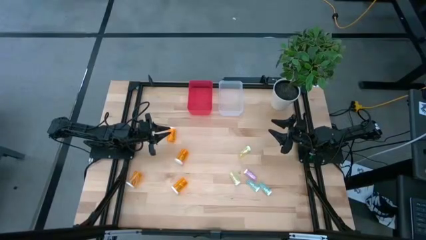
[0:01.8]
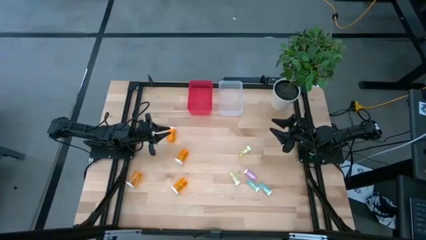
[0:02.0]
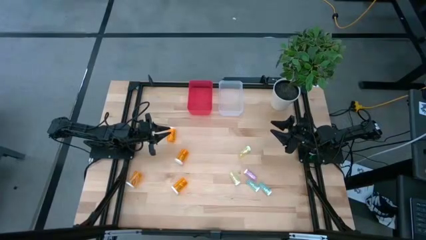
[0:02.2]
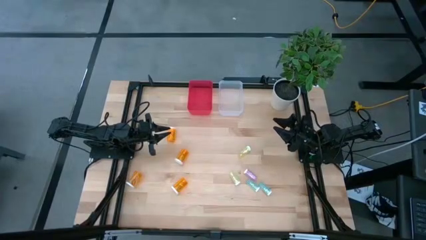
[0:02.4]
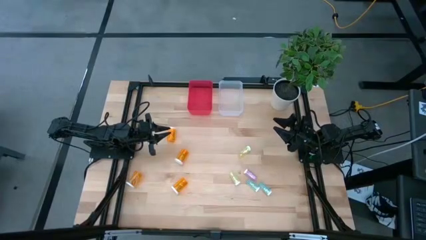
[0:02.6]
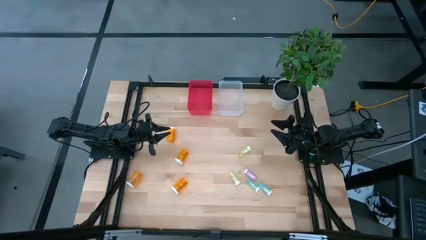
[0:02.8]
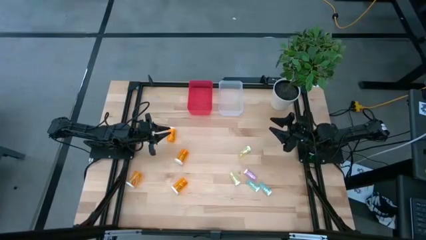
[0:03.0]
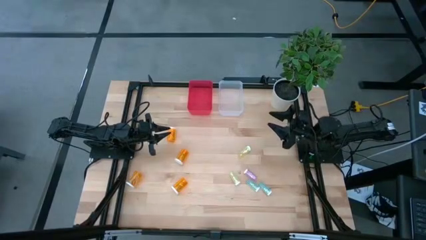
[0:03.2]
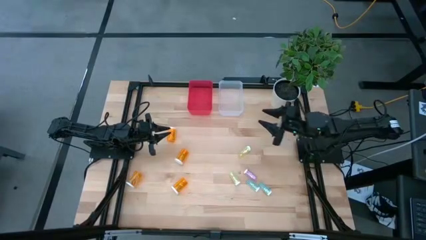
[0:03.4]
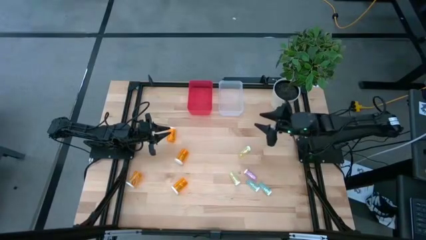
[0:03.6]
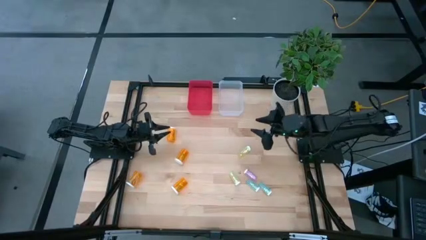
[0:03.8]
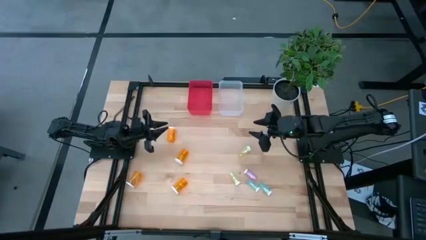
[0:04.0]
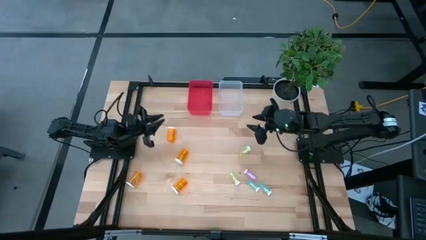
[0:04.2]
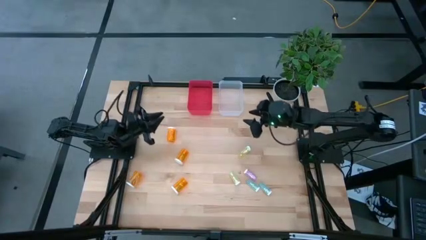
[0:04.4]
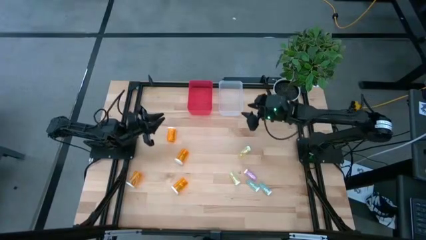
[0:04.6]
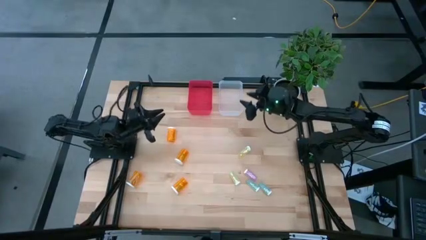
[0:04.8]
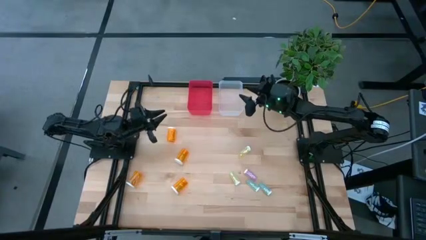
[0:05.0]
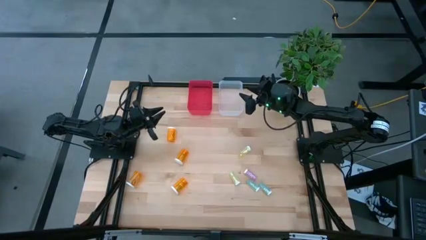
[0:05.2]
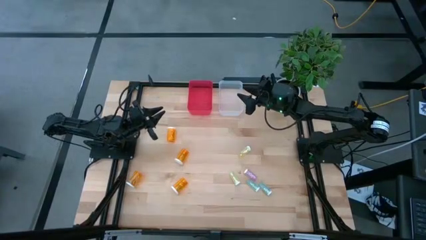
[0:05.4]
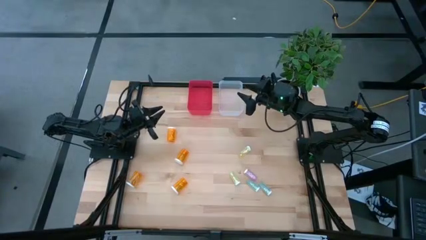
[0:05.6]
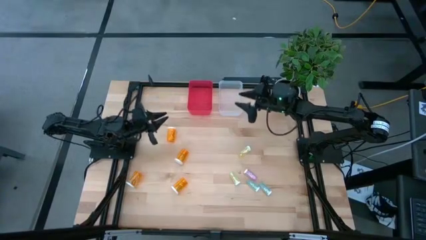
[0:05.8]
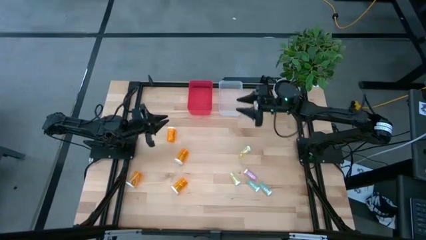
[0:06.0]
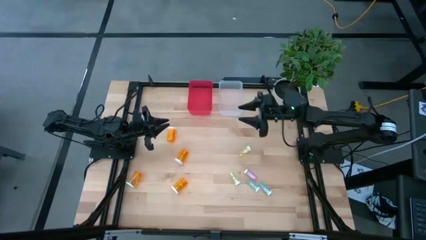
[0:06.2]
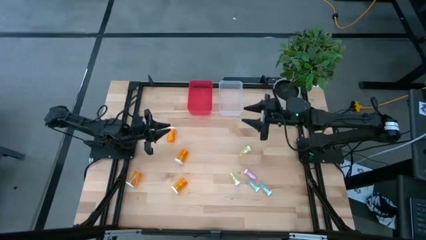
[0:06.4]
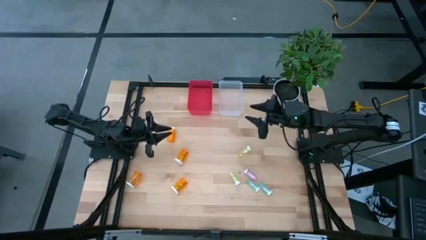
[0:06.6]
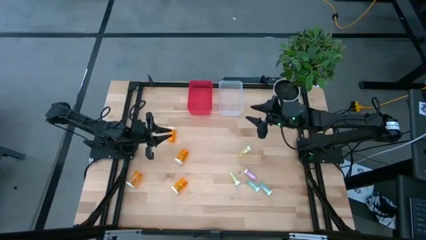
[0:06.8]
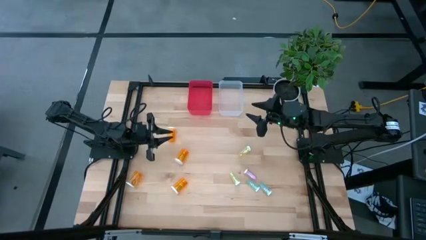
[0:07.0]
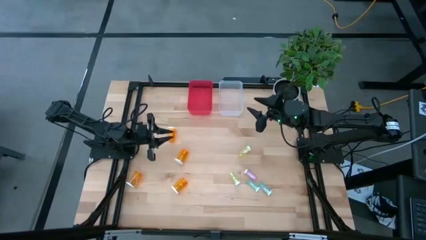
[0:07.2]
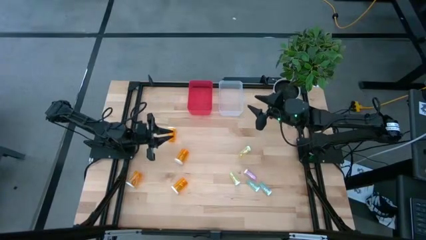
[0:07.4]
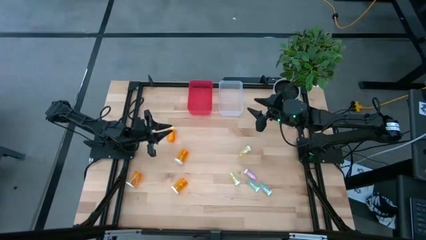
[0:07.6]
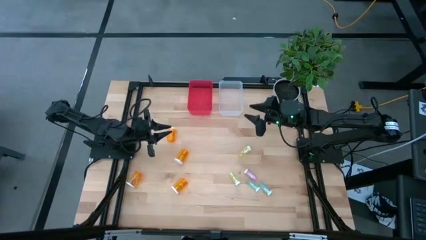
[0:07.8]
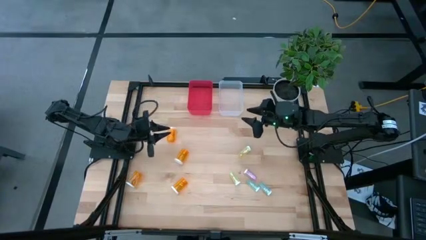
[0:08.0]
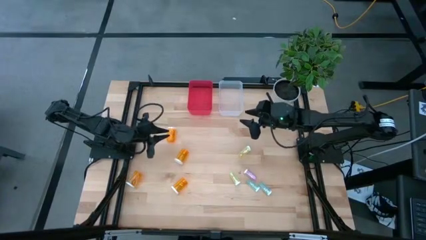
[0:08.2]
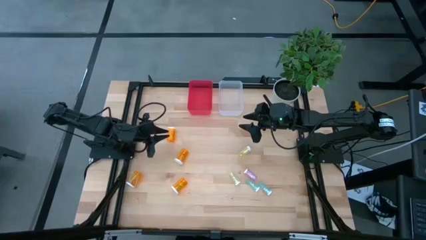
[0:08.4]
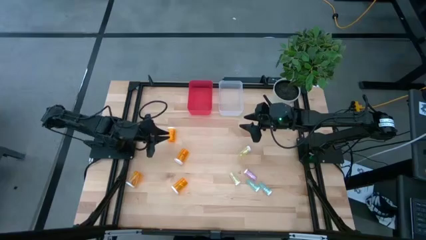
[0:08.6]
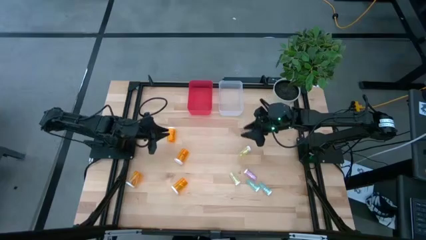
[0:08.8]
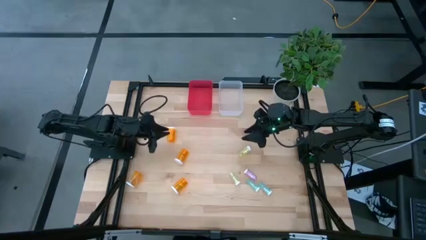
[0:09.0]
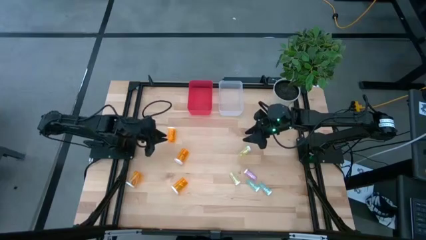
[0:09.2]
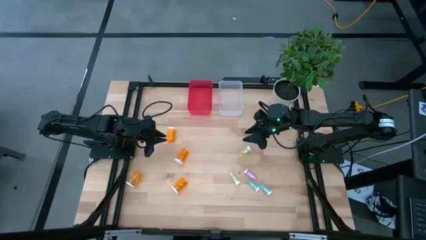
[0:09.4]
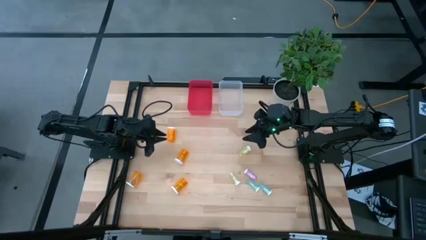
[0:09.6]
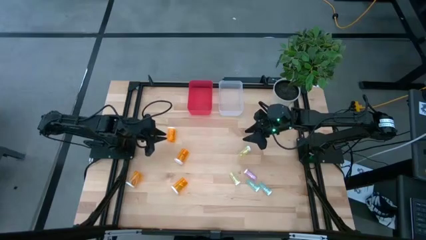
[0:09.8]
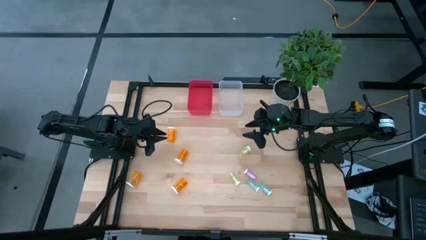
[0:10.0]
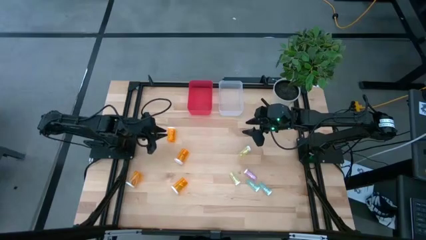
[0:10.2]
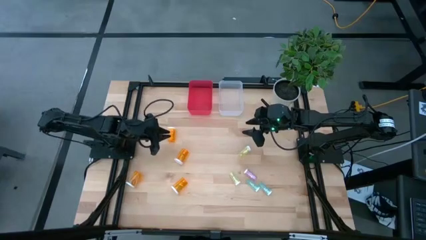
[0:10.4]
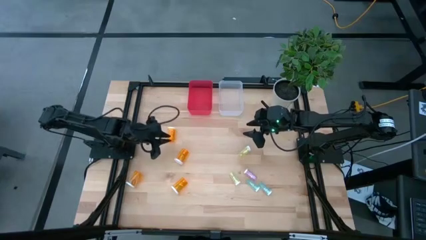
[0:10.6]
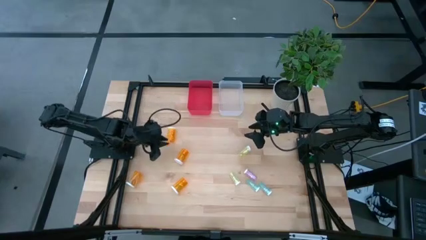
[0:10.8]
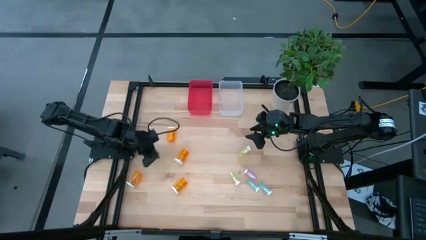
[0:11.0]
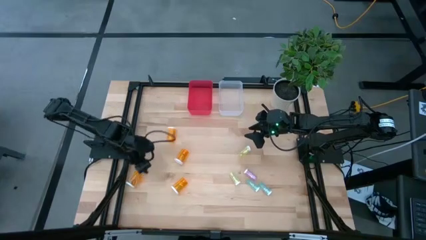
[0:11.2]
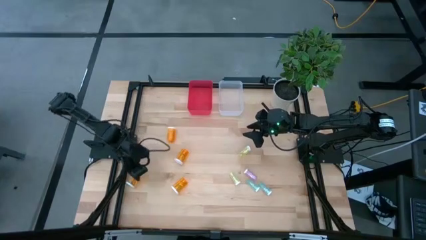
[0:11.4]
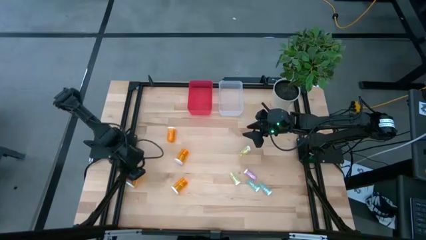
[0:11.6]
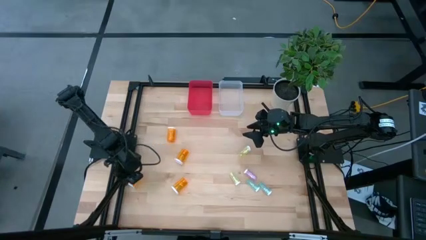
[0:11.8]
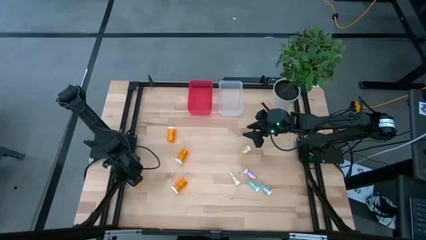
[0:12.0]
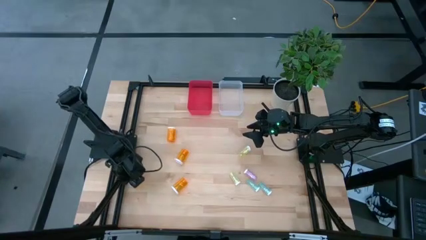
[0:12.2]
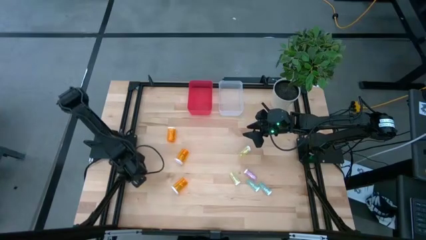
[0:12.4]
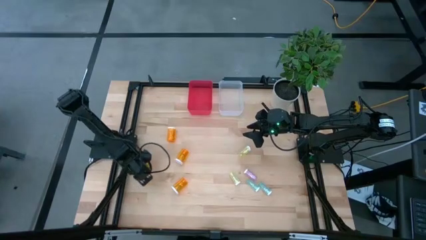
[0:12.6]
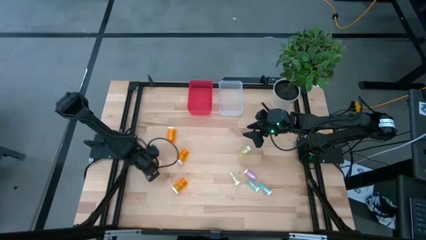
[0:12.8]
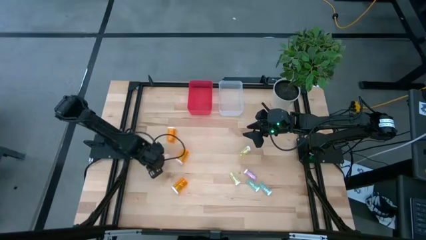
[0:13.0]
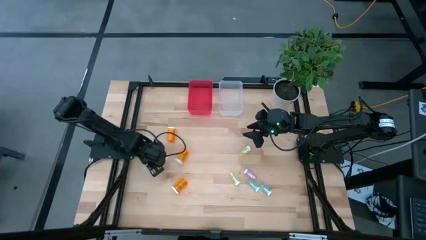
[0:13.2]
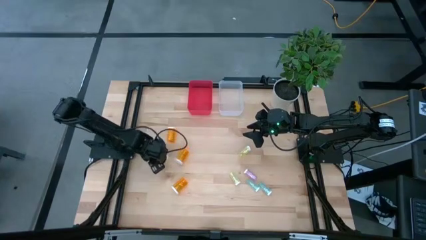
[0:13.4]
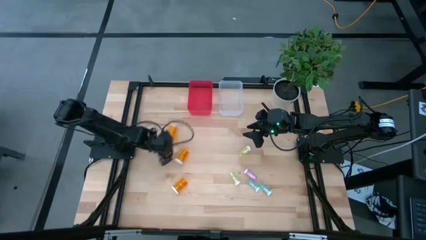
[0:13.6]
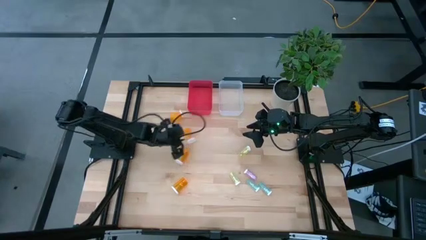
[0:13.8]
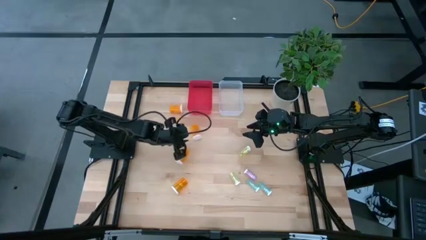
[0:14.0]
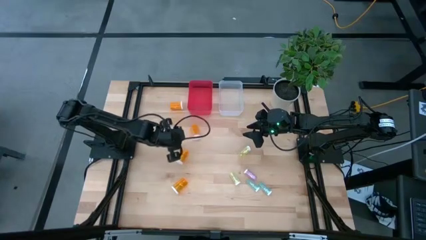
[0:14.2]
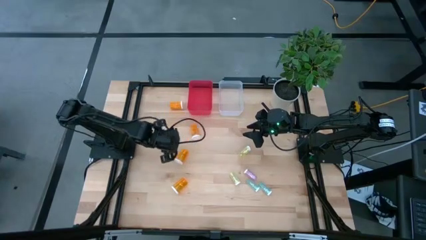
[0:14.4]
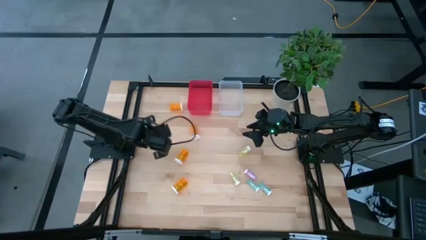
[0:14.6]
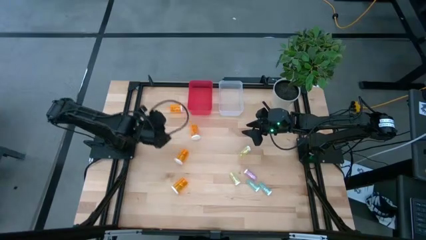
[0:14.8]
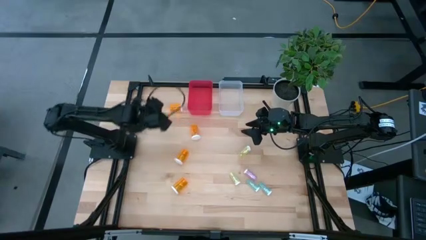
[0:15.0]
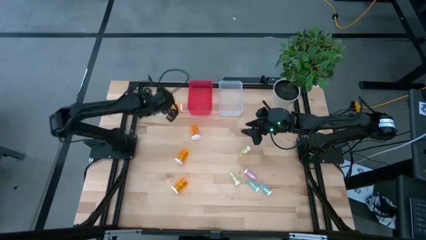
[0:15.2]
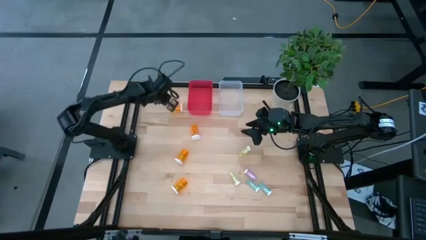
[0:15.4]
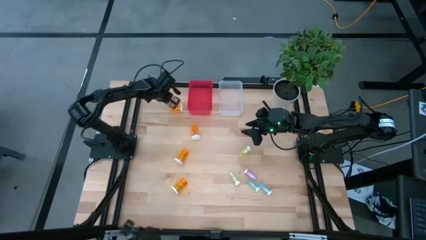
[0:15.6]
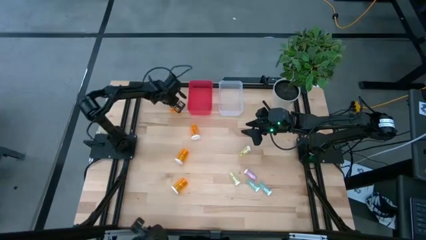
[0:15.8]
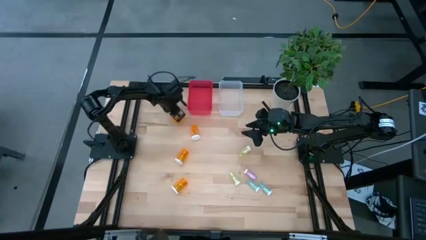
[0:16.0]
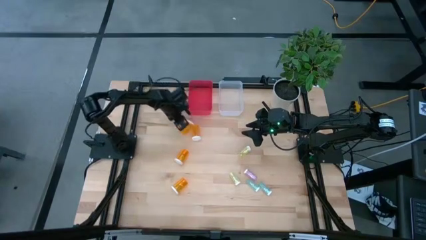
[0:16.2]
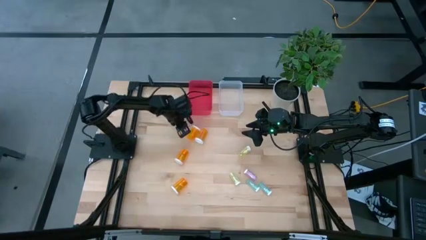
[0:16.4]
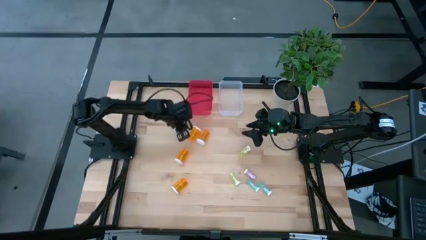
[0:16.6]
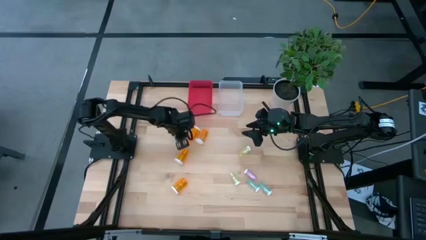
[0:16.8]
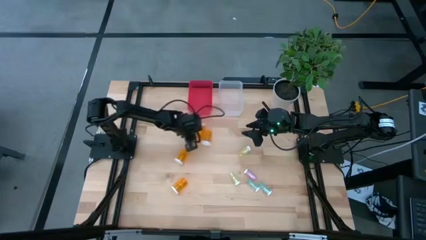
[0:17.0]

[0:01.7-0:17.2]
Task: Pick and place medicine bottles into bin by pill shape (circle, oval)
Move the large orange pill bottles to the middle of the table
